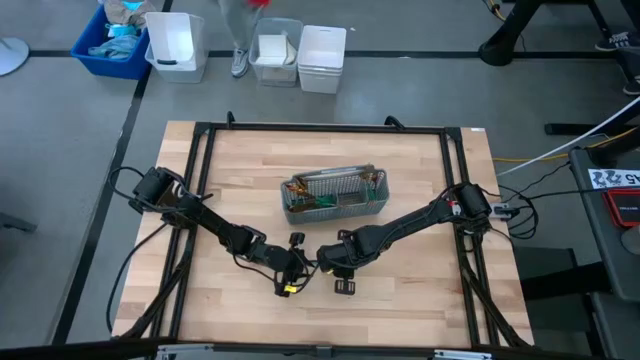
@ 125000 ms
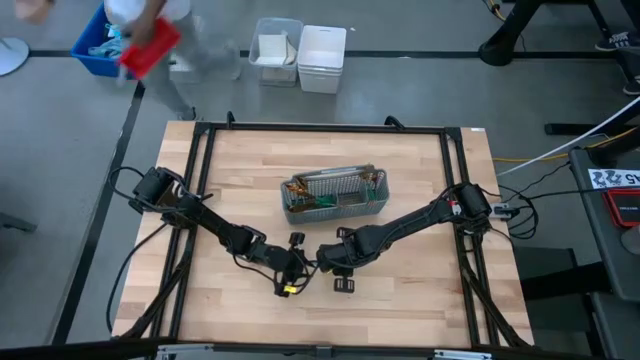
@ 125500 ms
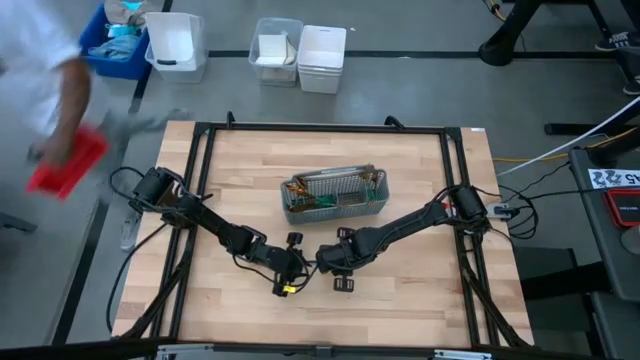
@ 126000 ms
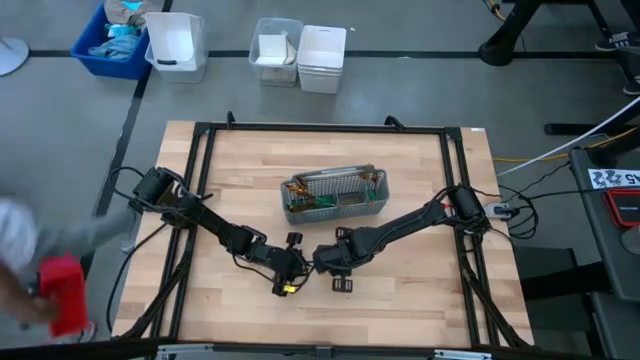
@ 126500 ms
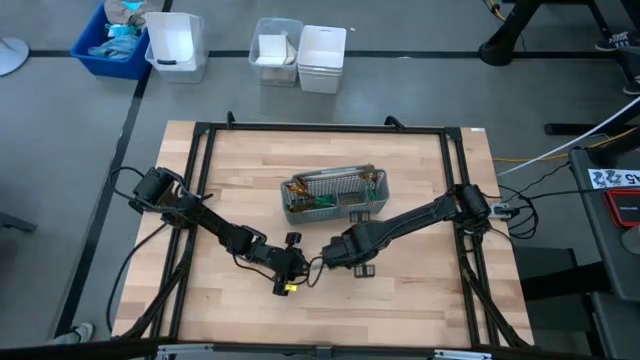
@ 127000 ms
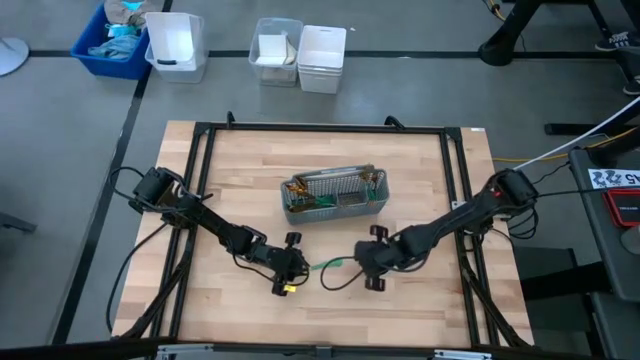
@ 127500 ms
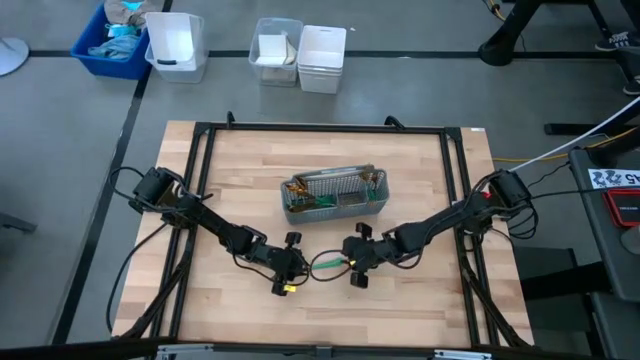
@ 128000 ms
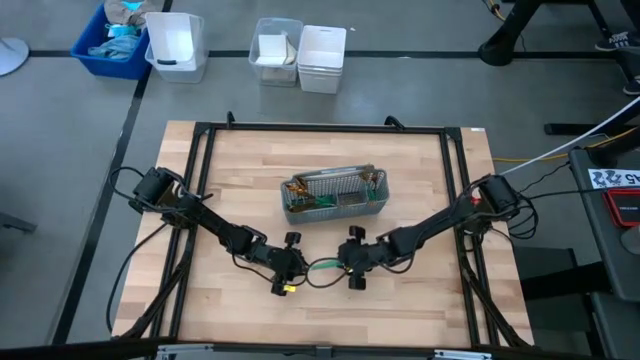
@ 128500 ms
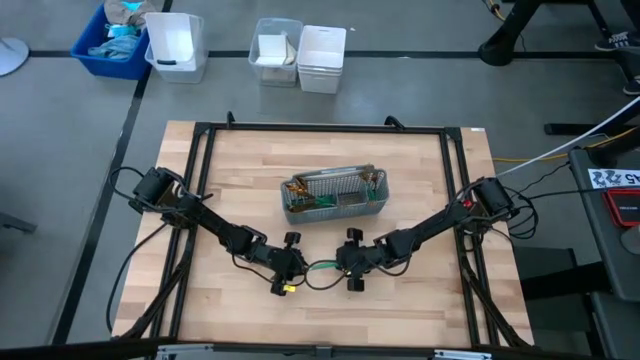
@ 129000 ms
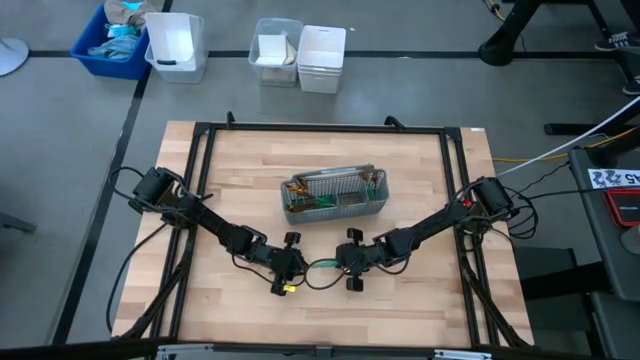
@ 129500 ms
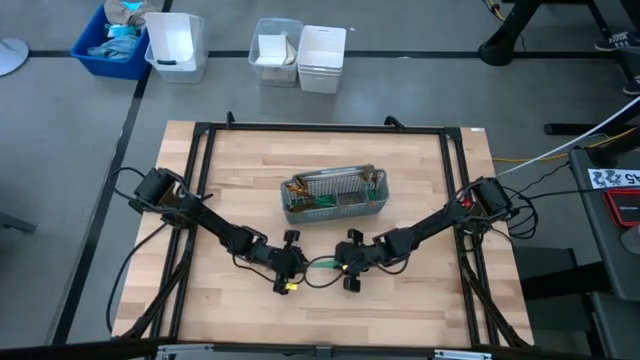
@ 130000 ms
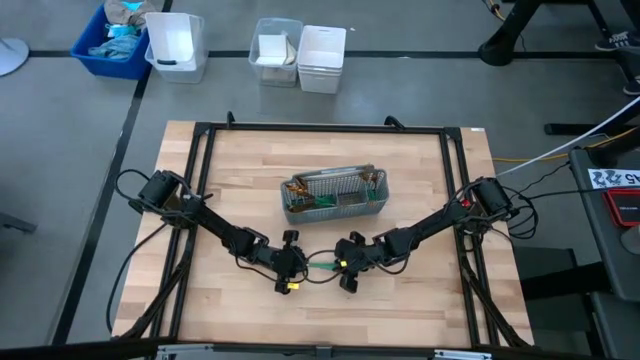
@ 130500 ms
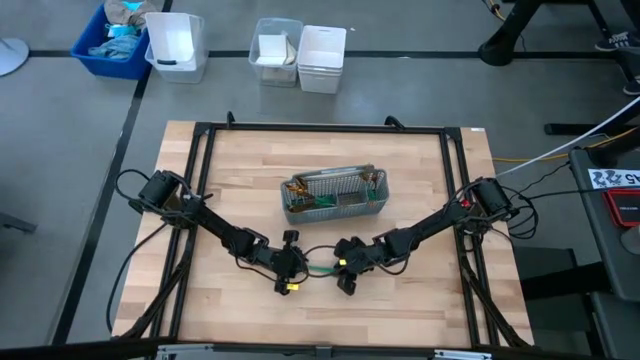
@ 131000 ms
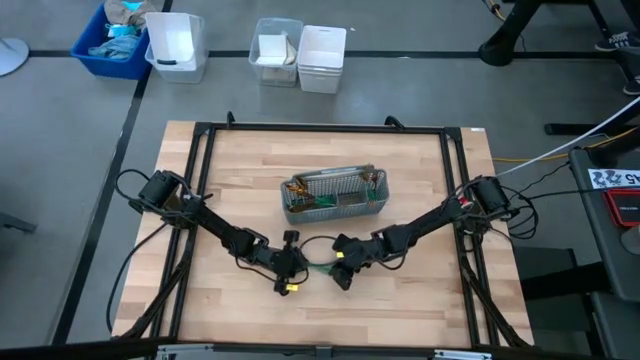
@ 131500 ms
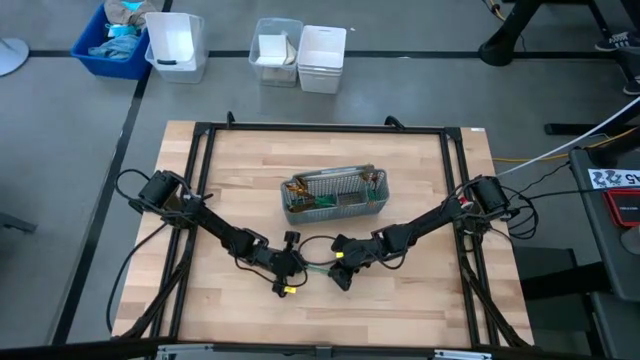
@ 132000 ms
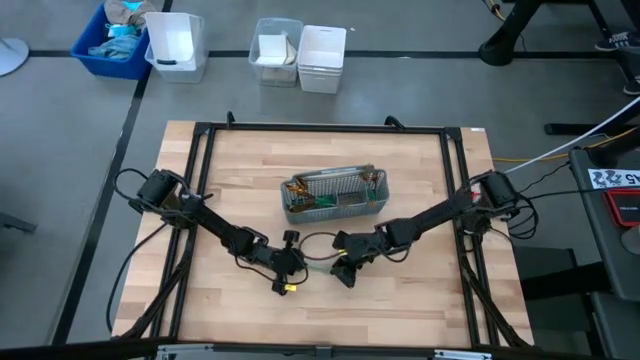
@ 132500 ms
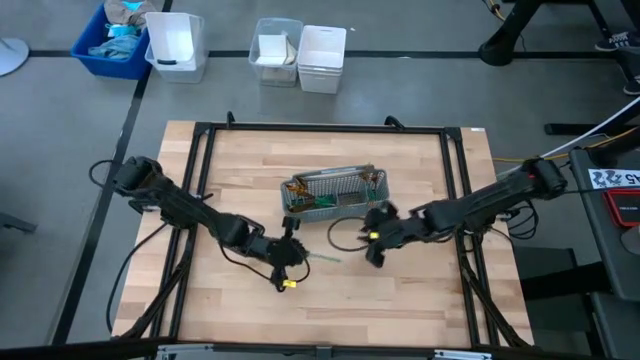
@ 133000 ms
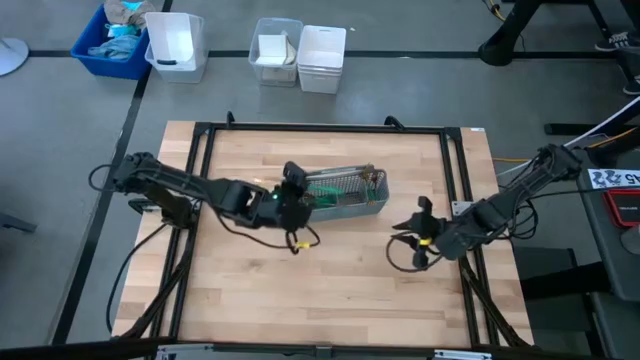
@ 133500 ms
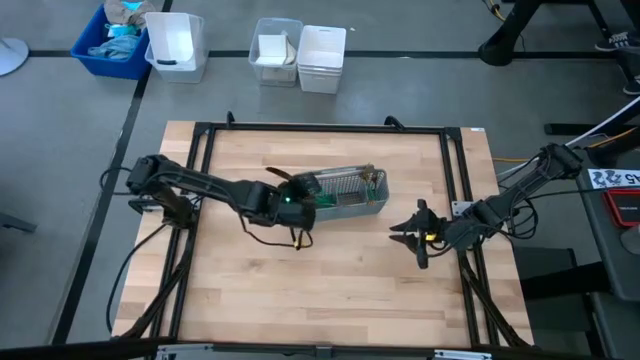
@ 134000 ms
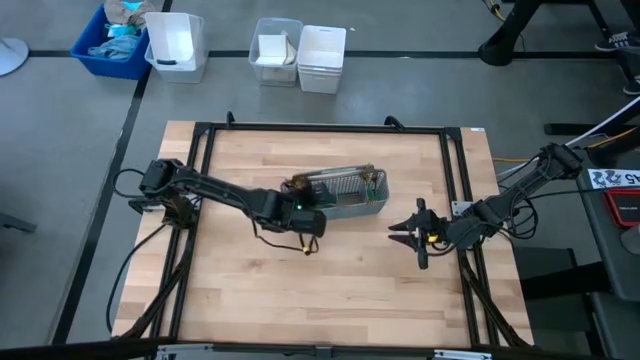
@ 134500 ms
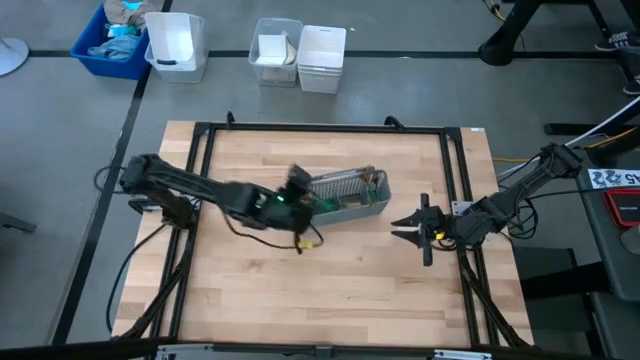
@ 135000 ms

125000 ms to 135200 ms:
Task: Sort silverware
Put the green knife in the gray silverware basket

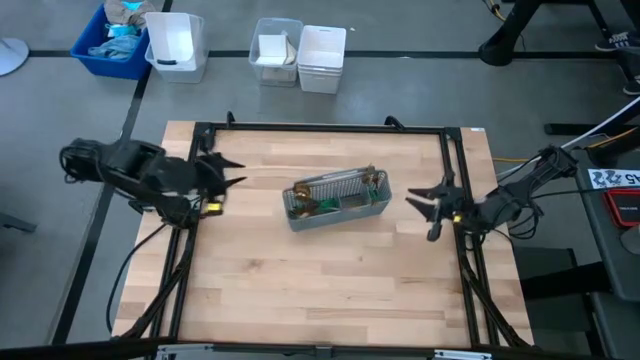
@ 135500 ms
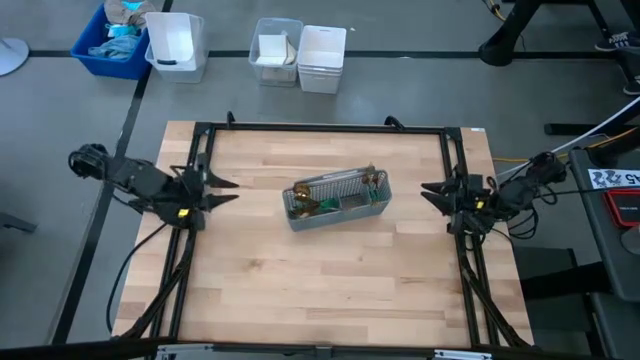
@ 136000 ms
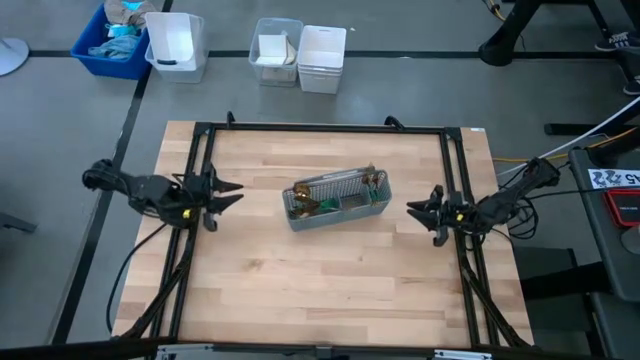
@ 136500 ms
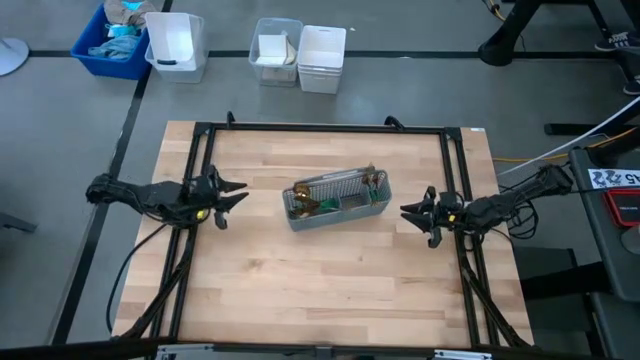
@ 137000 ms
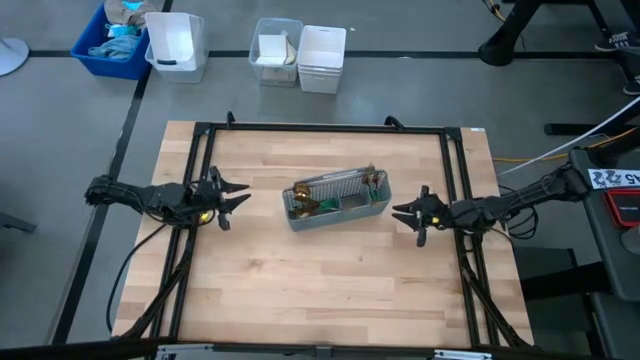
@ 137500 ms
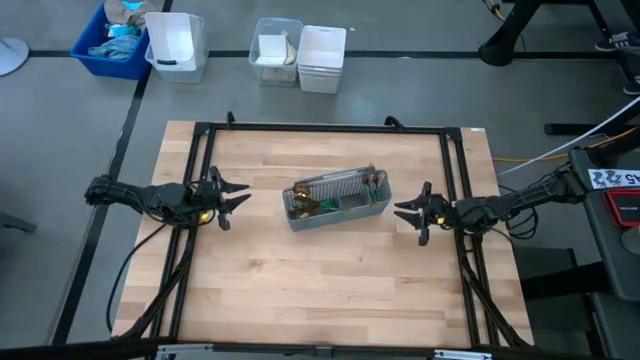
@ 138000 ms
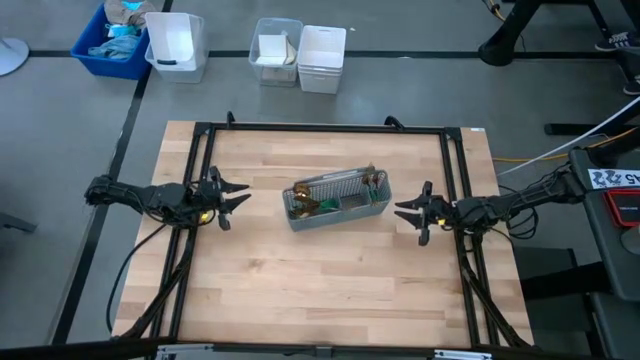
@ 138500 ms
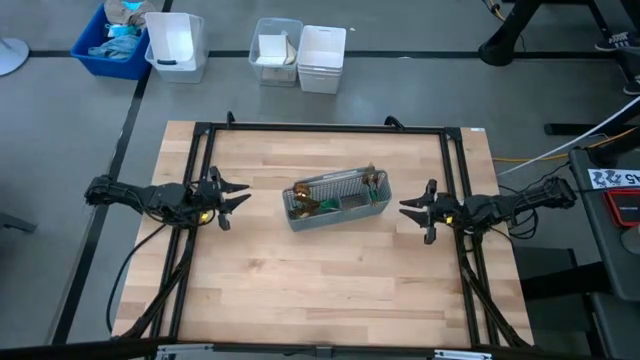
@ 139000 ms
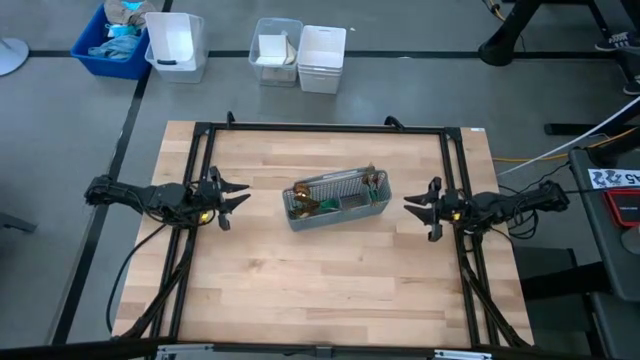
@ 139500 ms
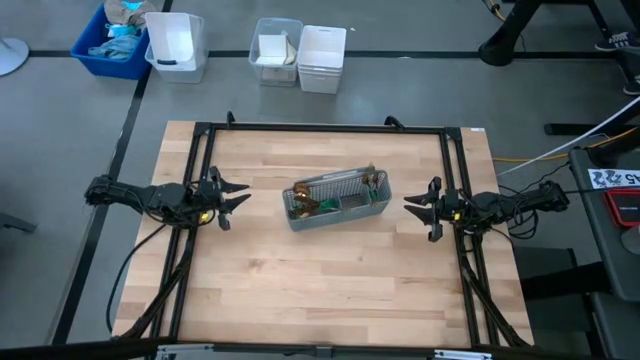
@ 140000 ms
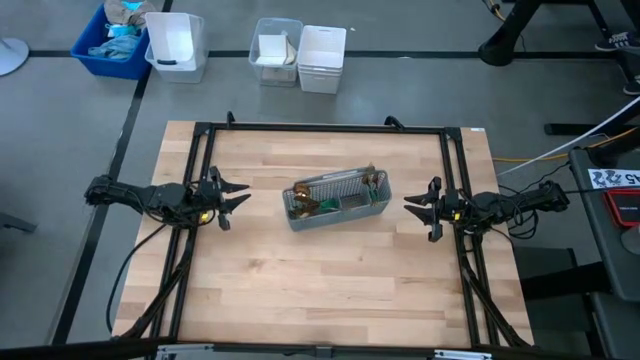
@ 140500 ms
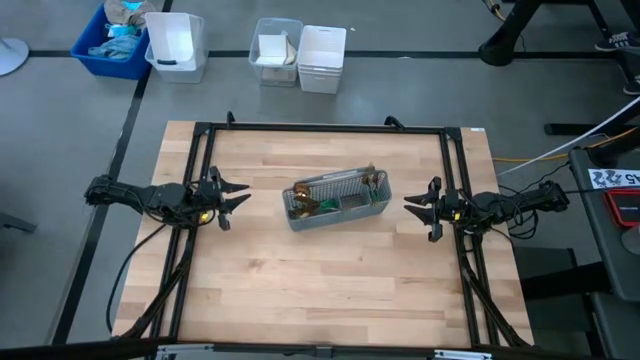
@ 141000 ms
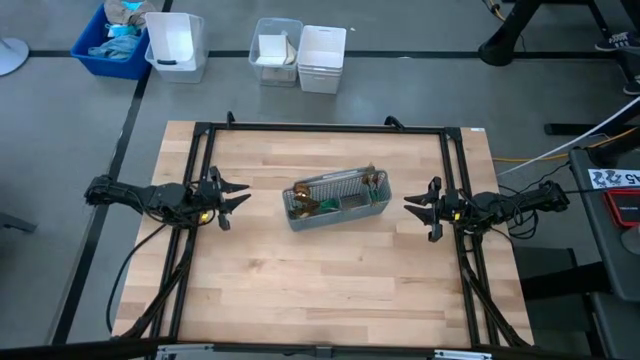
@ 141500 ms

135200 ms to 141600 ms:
Return to Home Position

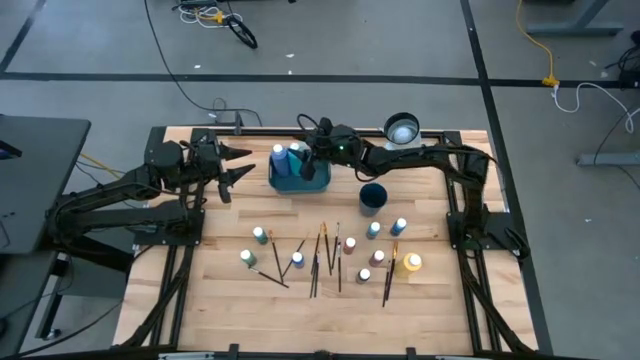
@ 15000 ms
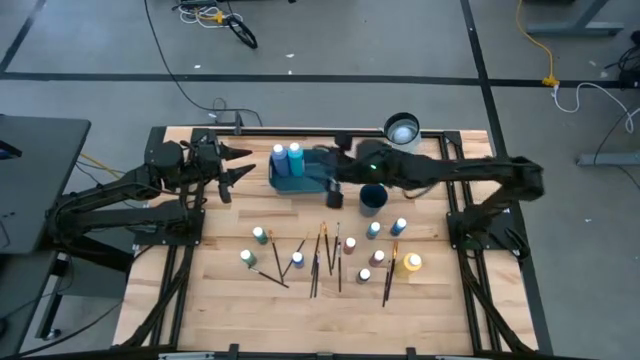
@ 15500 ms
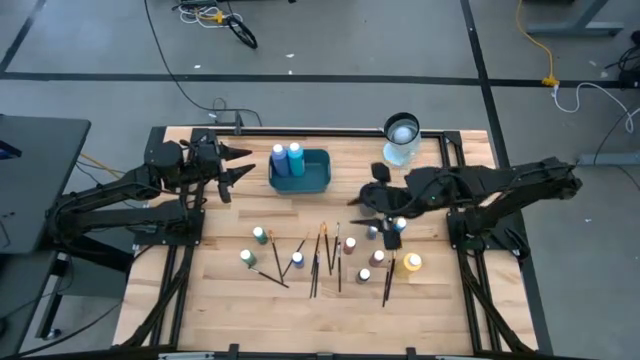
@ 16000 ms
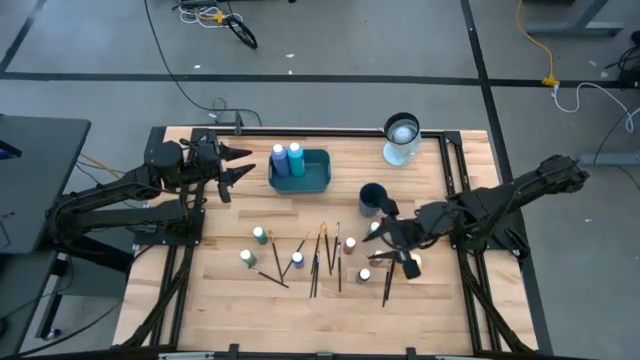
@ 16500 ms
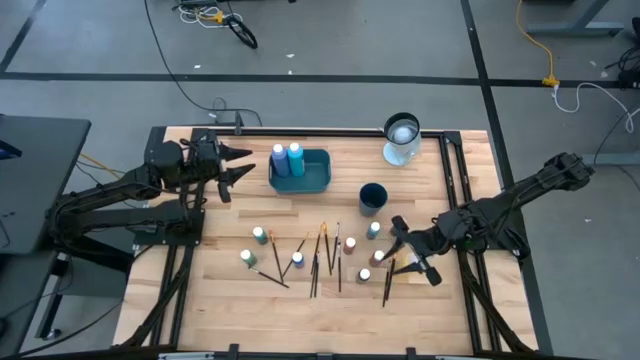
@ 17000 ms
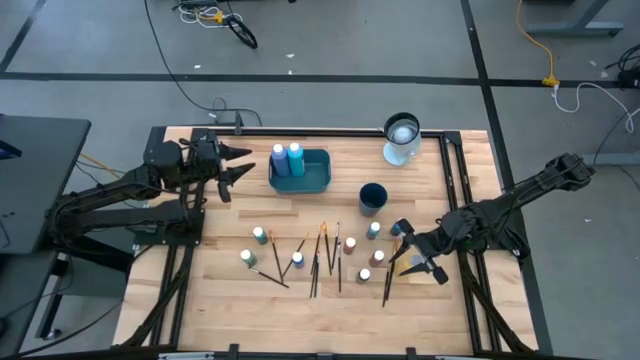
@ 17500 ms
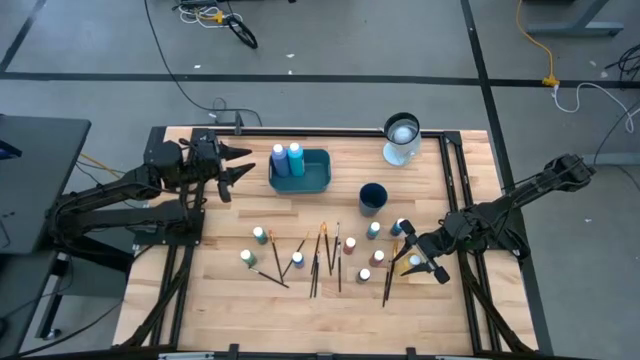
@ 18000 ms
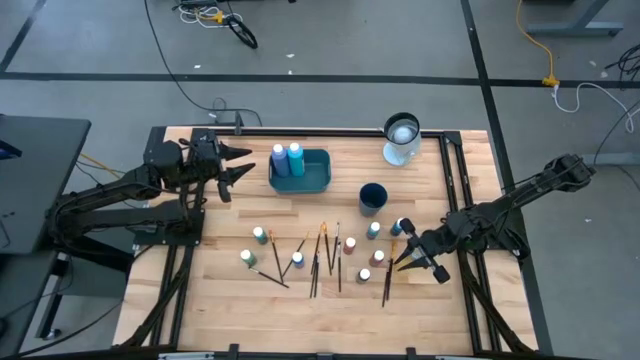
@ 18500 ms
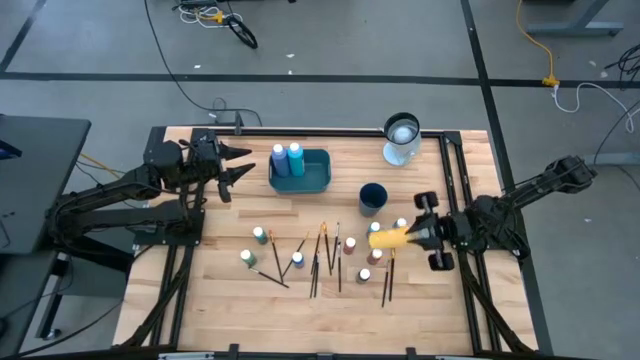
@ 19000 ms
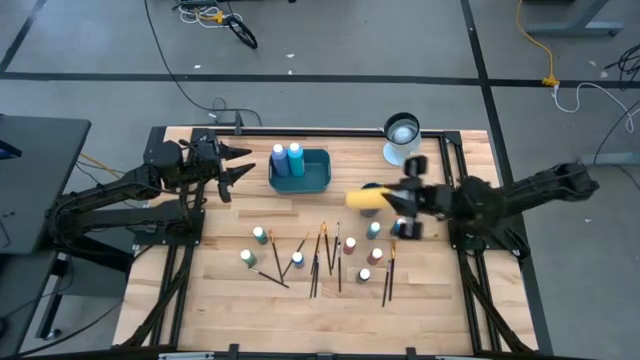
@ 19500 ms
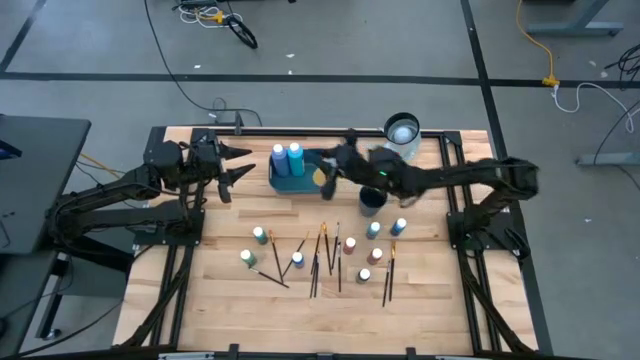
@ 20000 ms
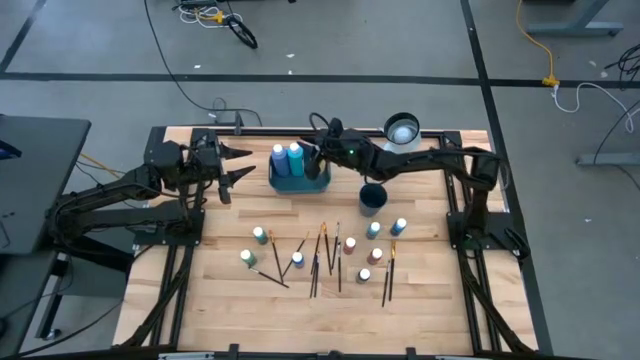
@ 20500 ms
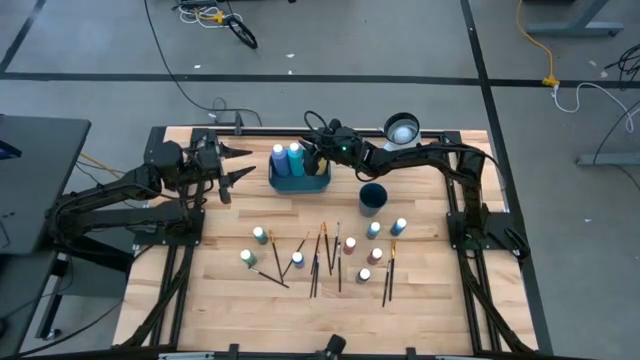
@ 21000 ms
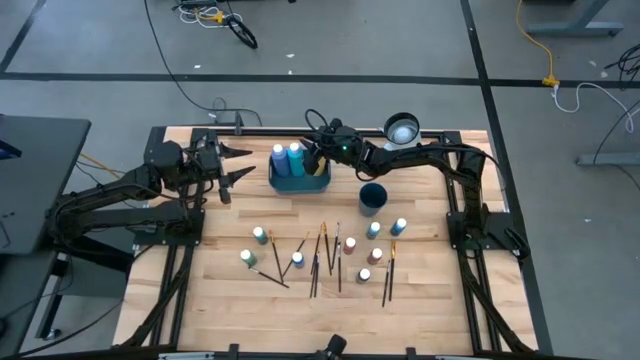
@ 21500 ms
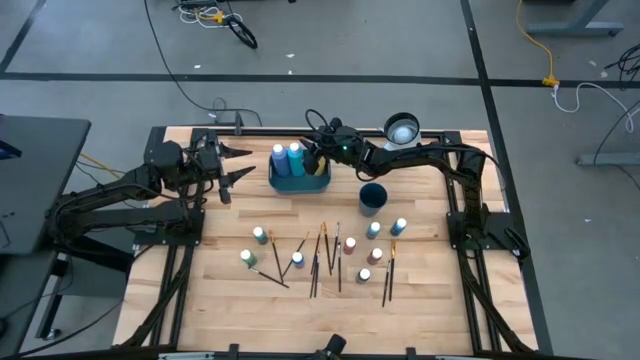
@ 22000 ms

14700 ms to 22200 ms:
Task: Pick & Place Paint Supplies
Put the yellow paint bottle into the blue bin
